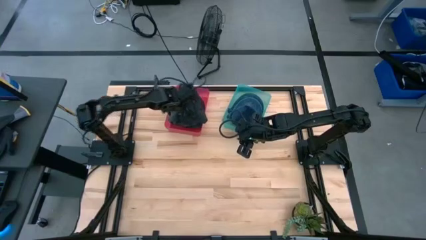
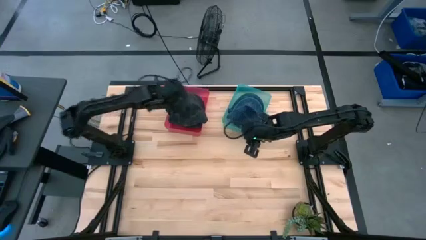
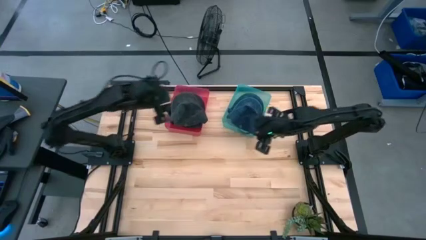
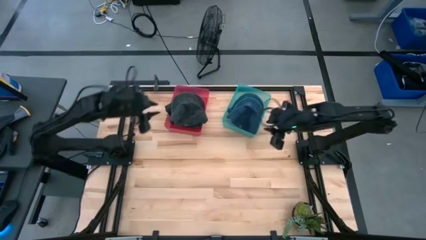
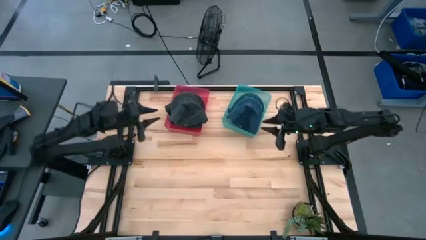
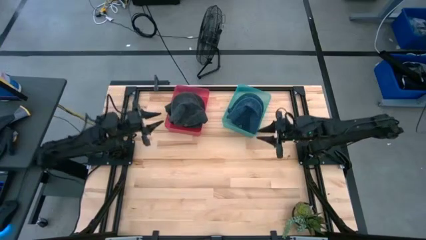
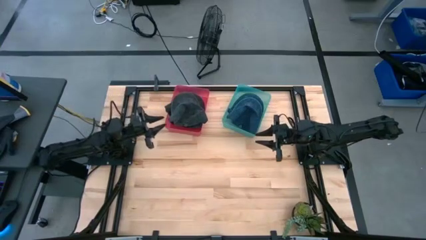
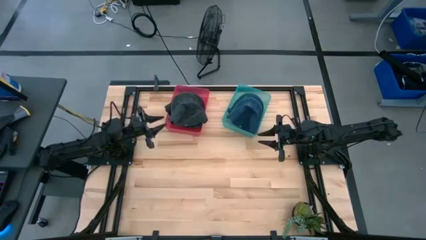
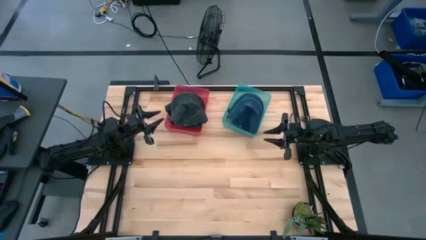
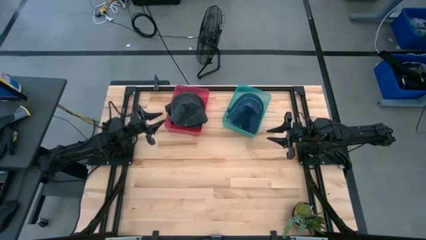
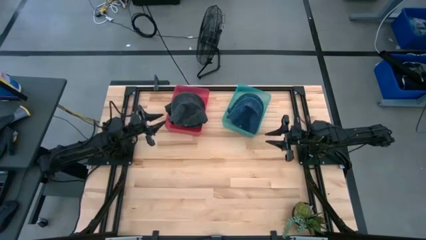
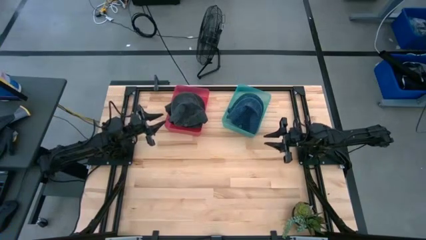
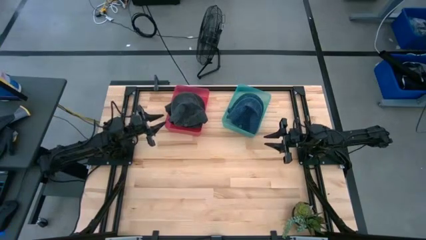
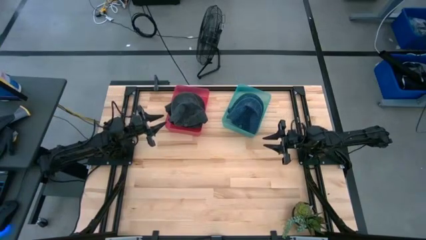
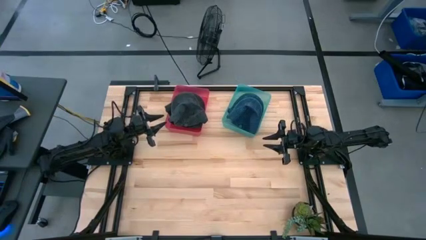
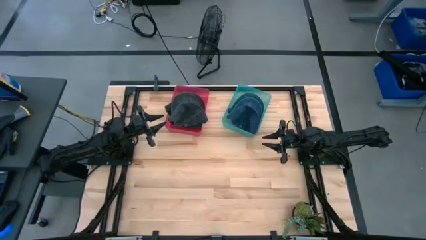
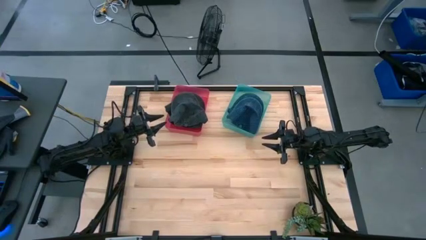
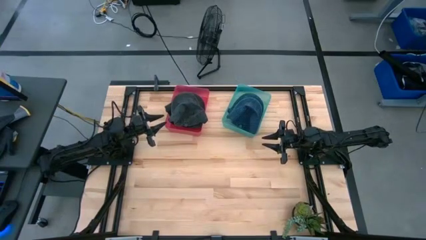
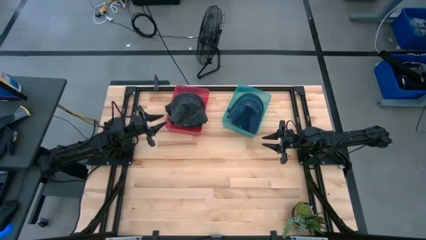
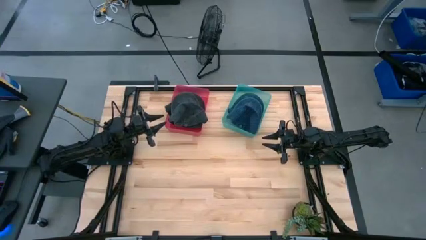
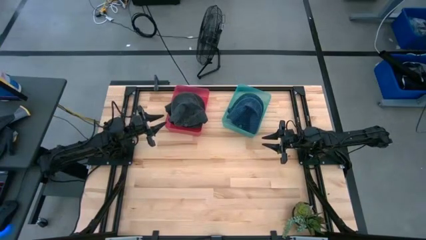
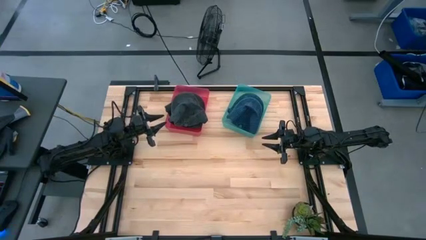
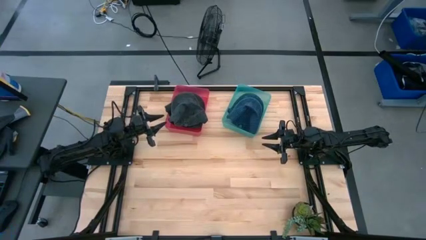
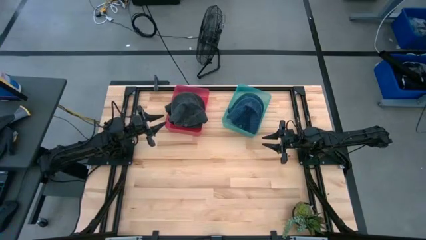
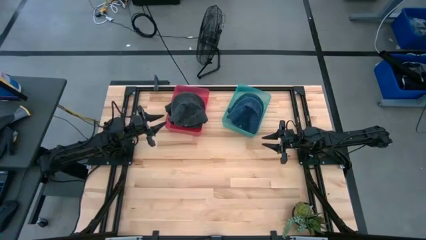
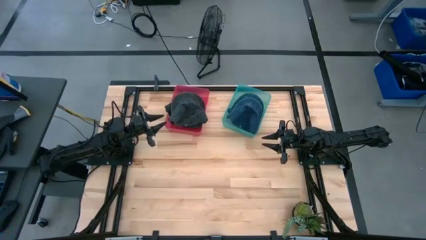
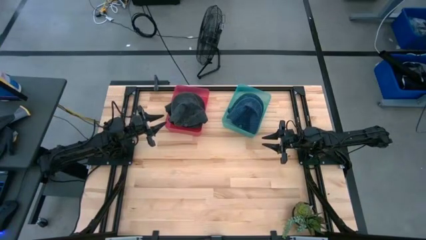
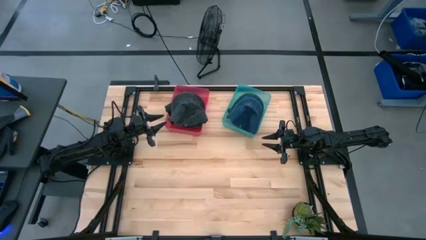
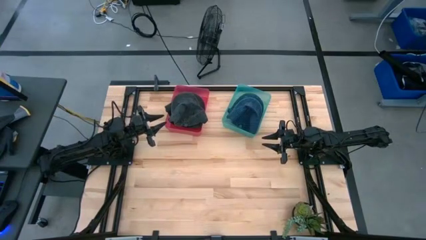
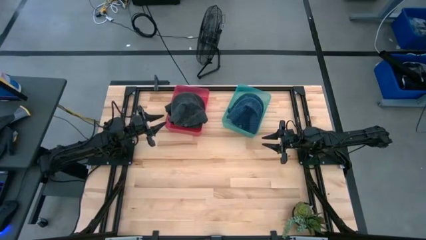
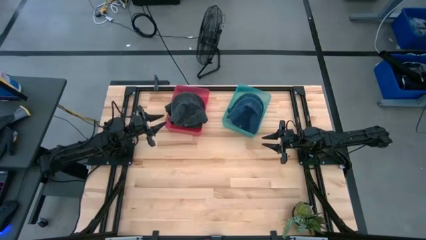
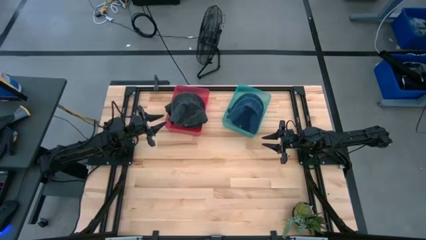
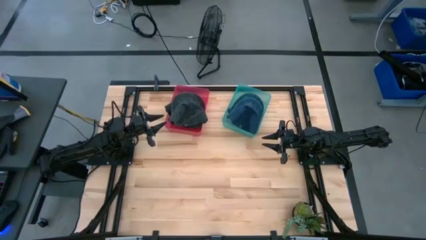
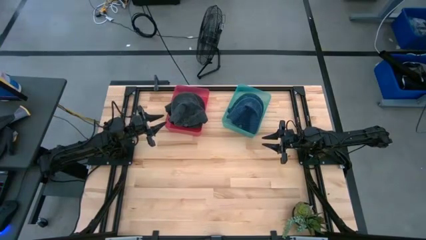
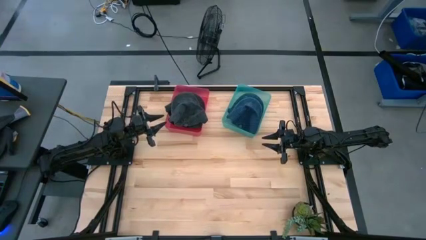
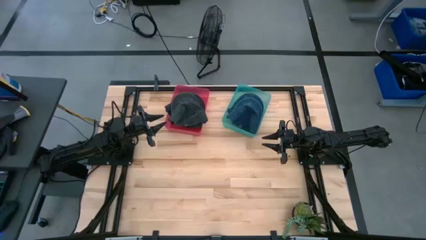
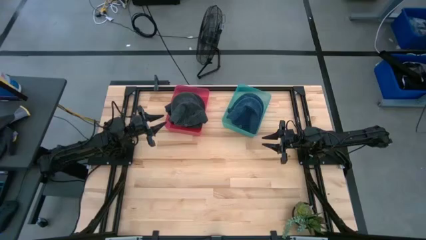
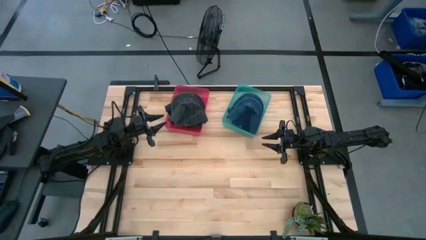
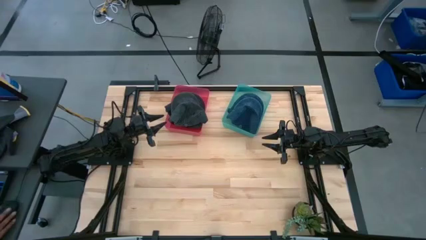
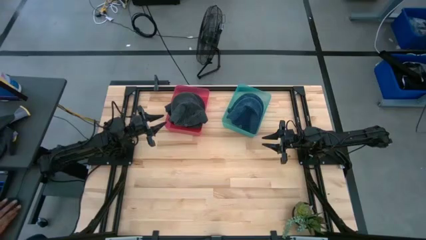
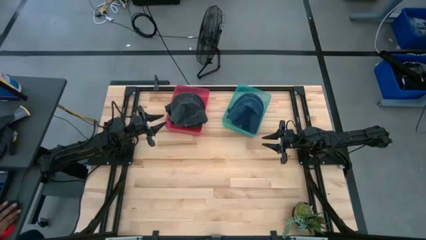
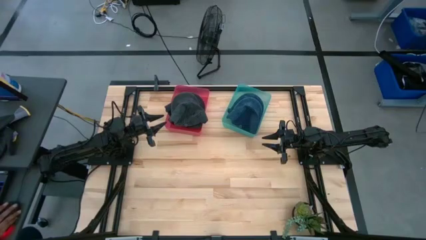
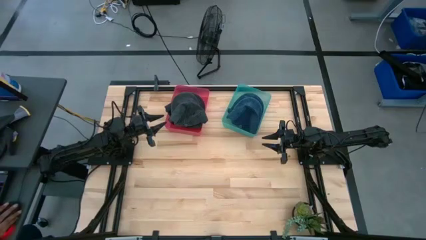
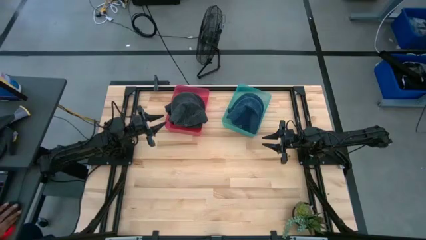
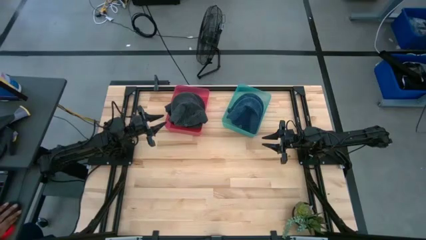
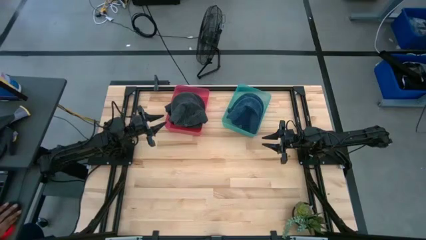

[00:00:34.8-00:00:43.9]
Task: Pick & Place hat
Return to Home Position

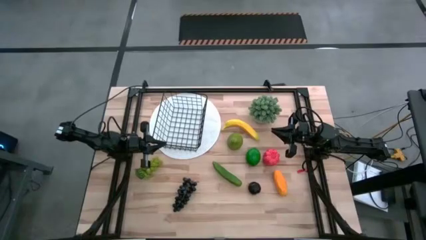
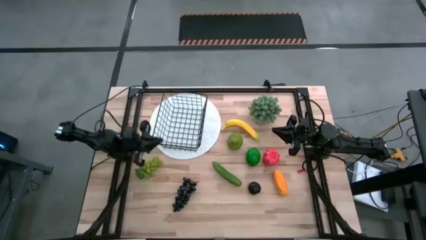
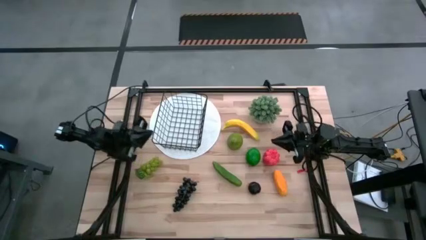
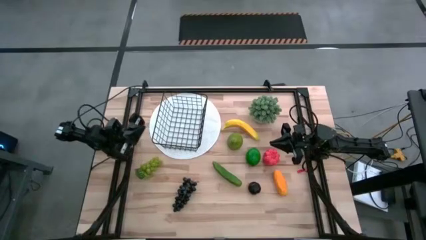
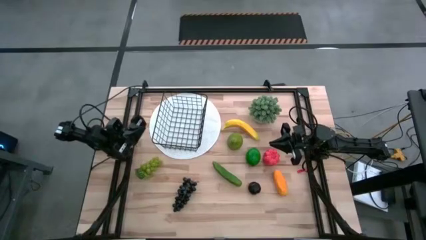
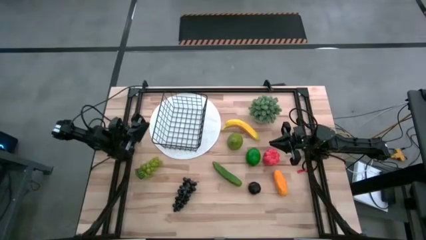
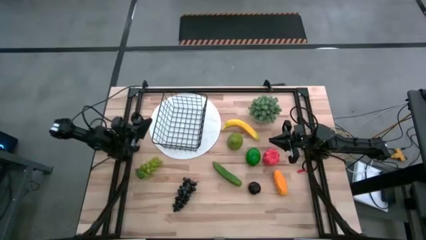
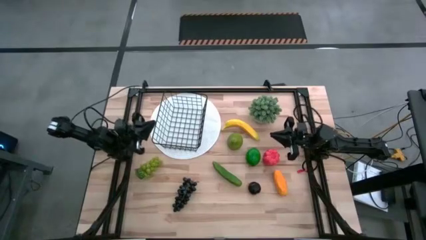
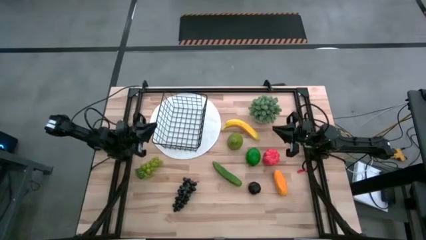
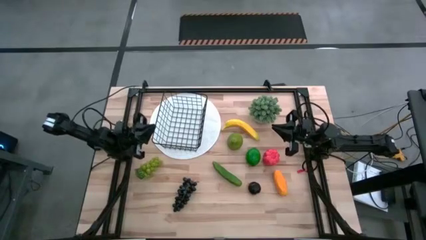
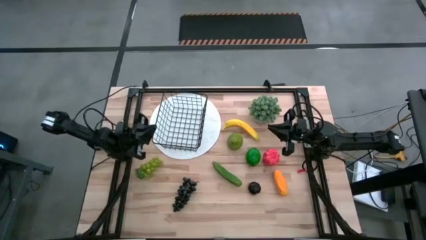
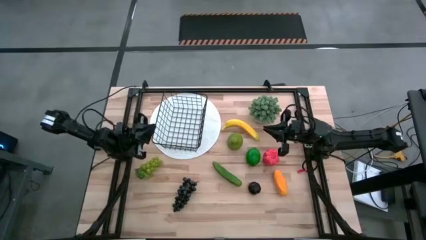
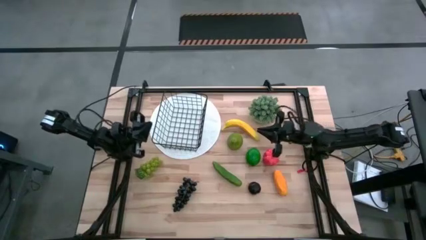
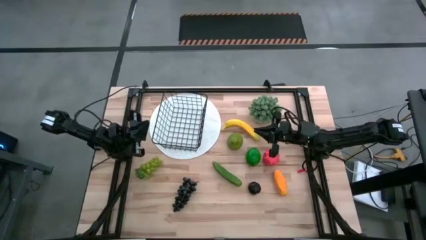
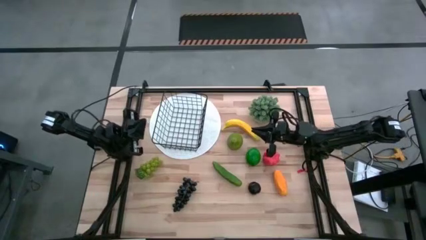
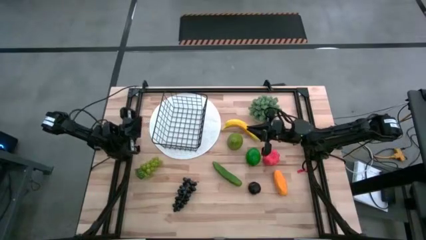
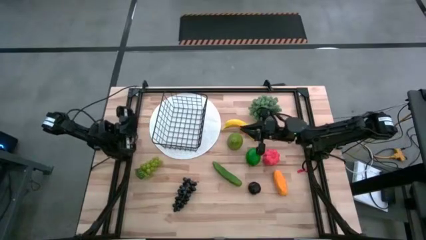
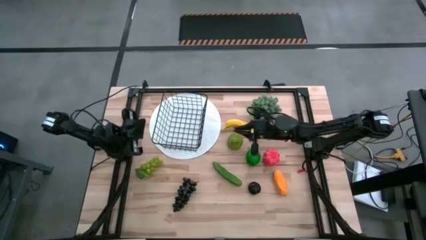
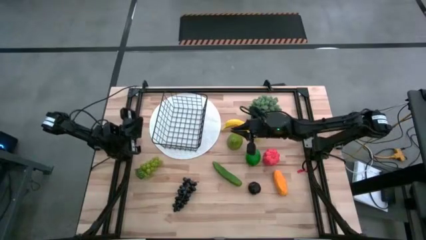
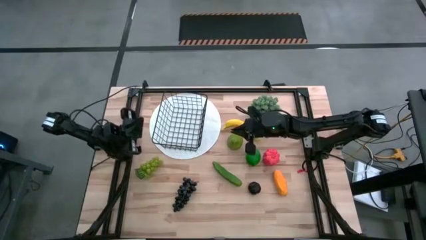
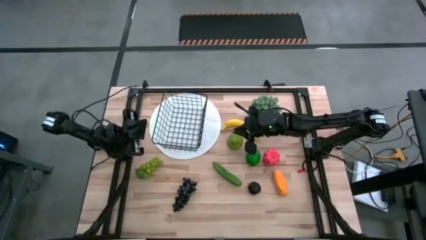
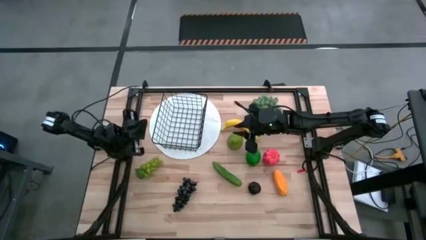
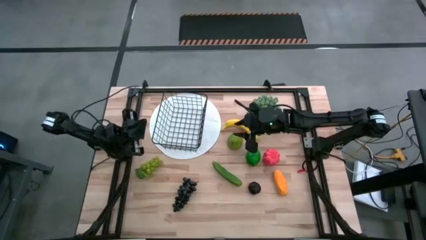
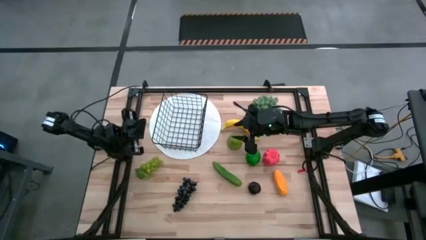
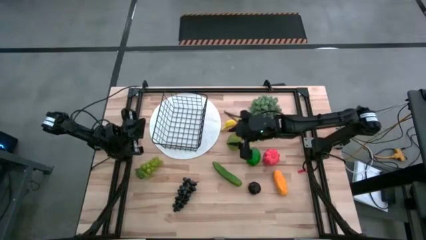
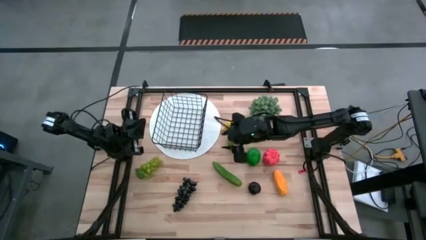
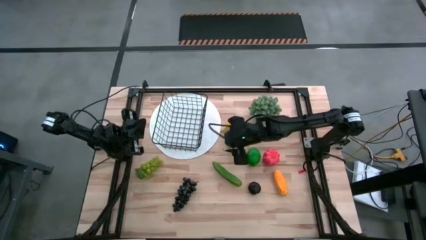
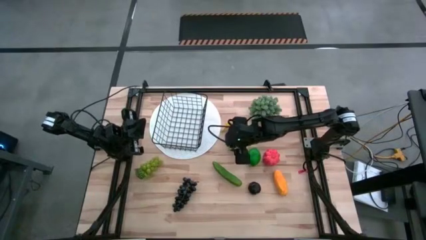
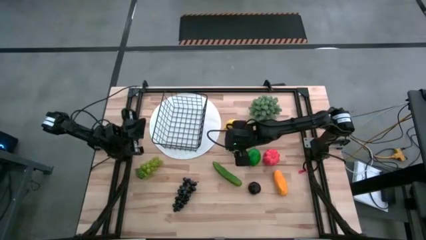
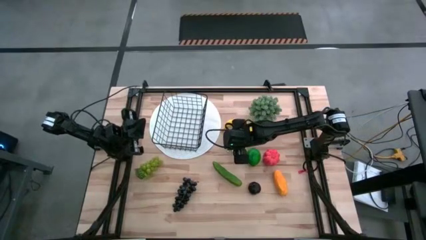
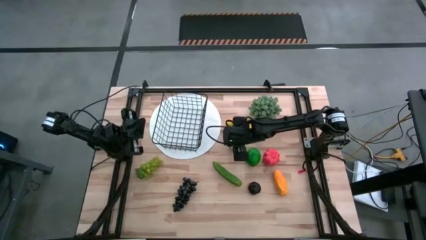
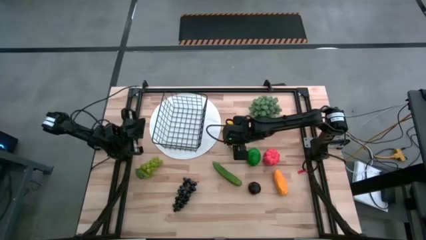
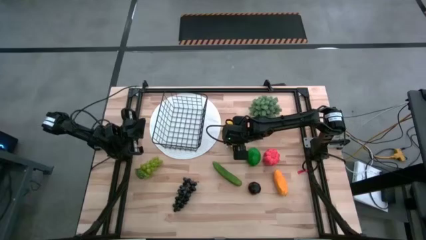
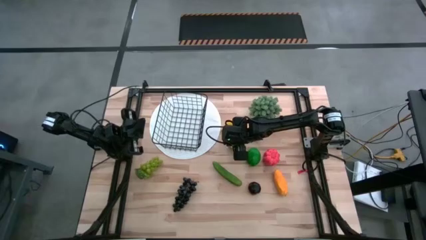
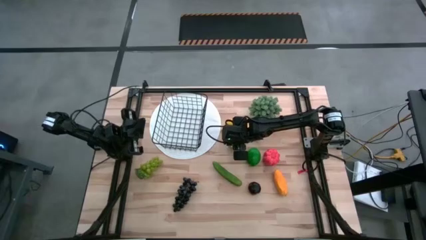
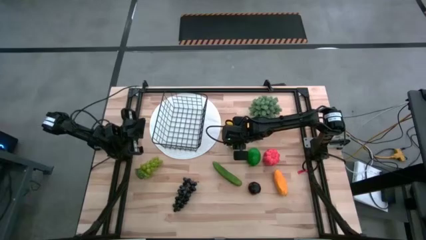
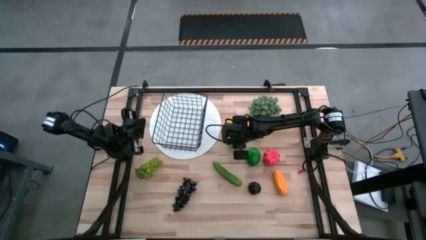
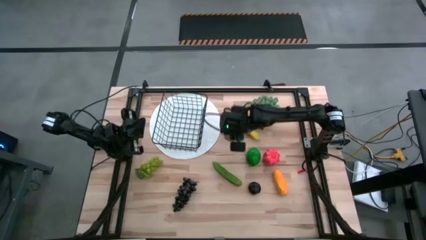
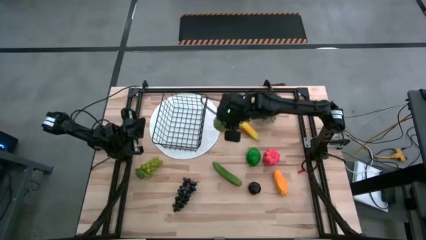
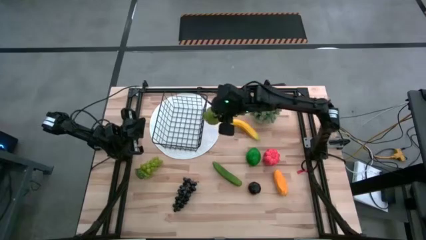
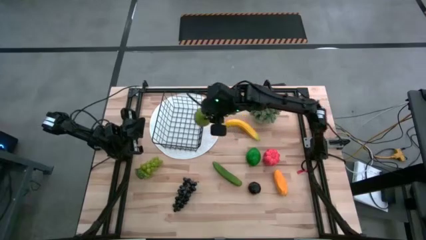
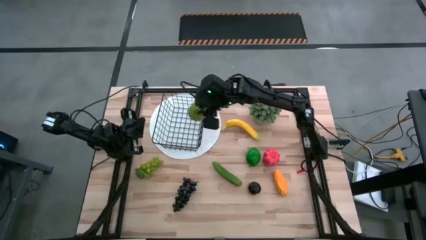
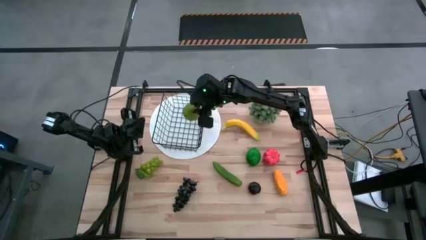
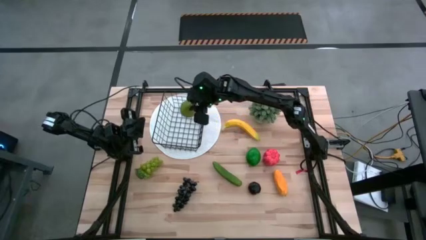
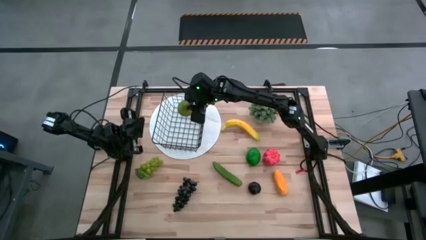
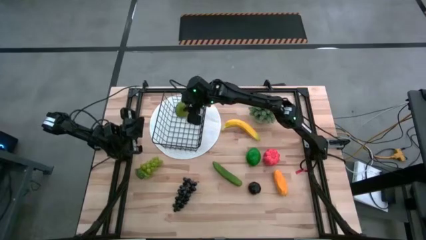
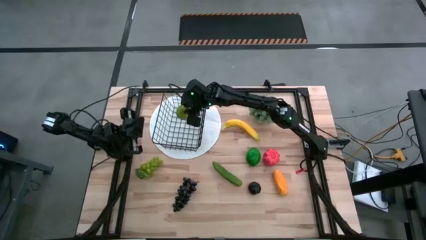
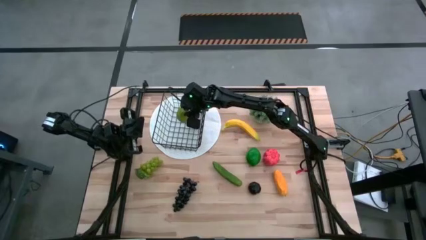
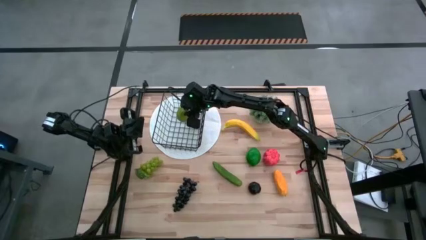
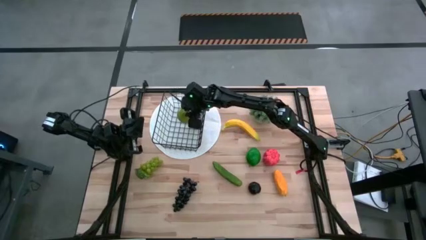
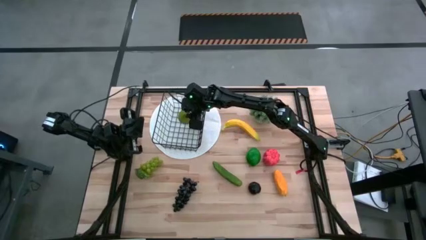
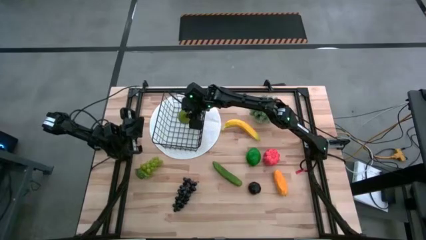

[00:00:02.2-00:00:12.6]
Task: Build produce basket
Put the green pear into the wire basket
